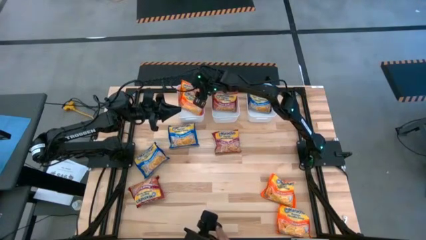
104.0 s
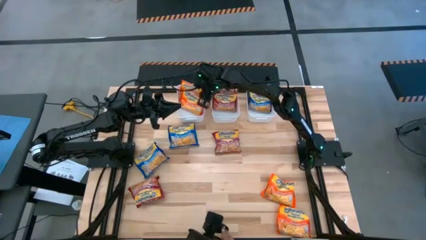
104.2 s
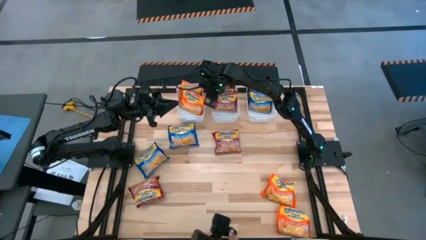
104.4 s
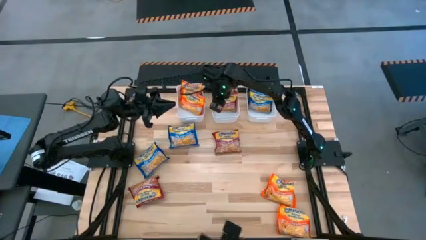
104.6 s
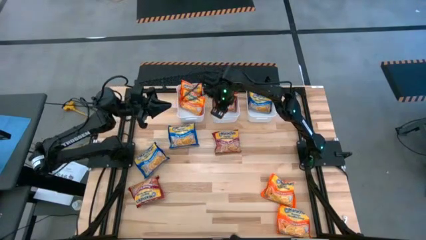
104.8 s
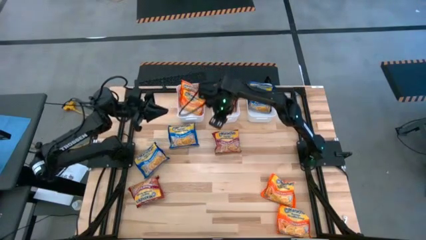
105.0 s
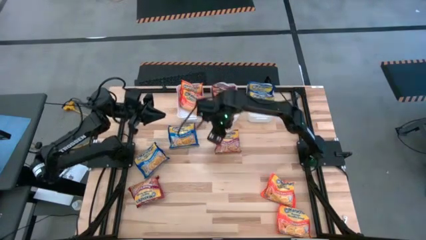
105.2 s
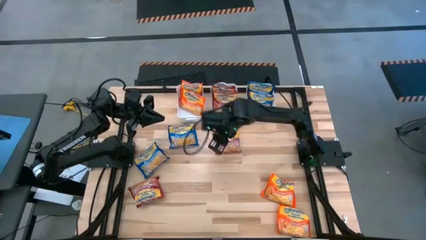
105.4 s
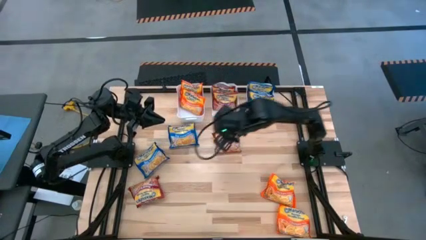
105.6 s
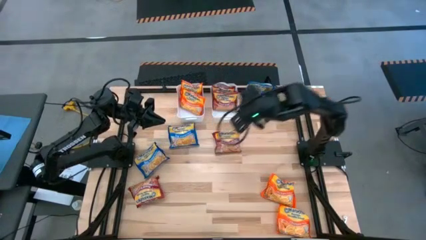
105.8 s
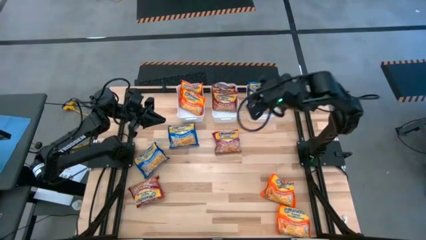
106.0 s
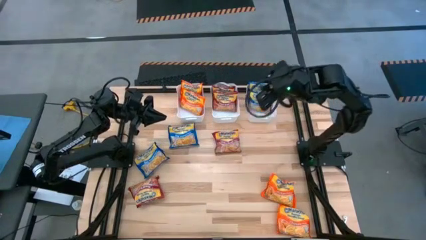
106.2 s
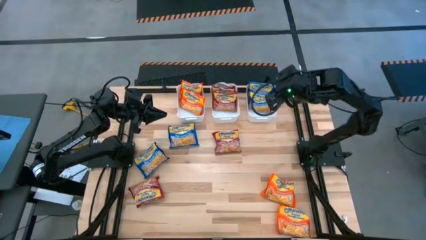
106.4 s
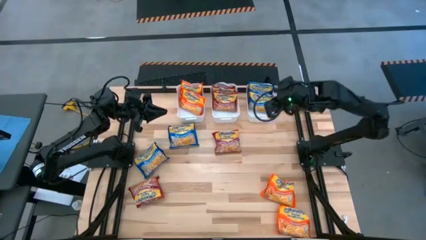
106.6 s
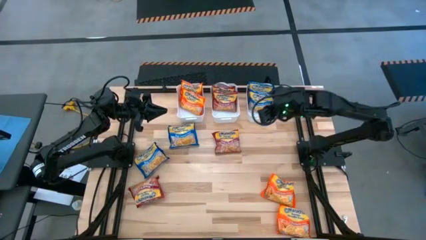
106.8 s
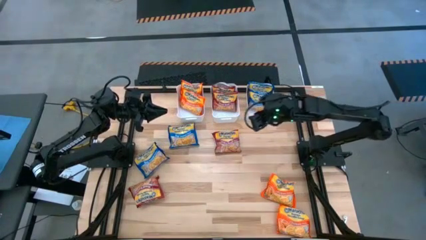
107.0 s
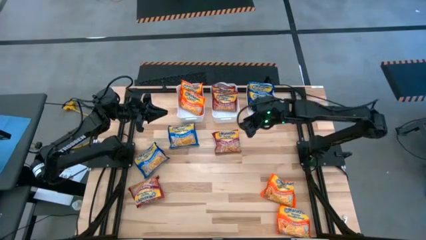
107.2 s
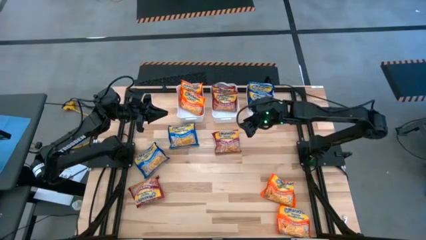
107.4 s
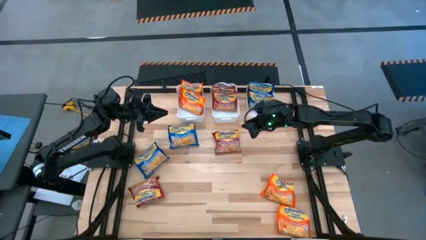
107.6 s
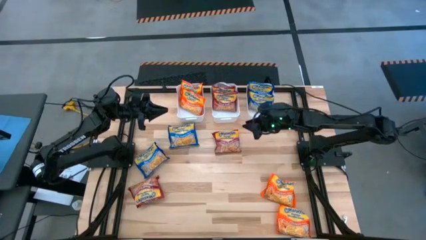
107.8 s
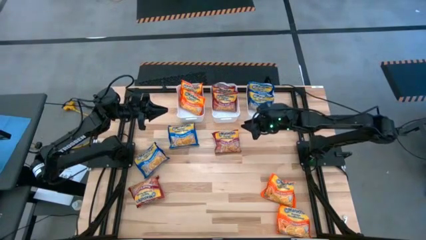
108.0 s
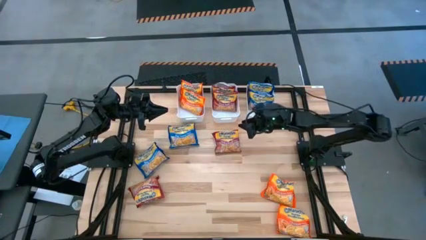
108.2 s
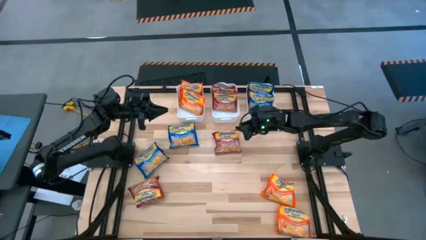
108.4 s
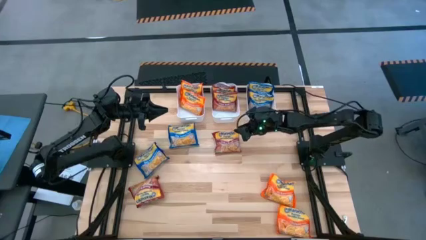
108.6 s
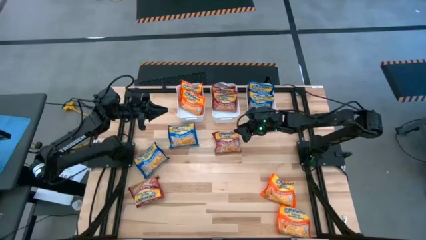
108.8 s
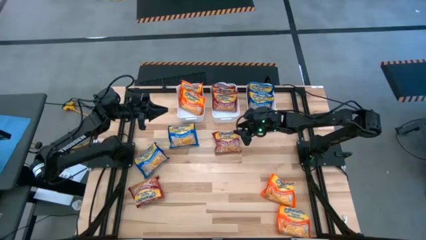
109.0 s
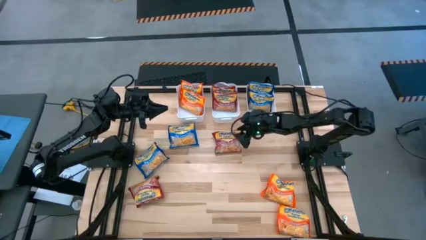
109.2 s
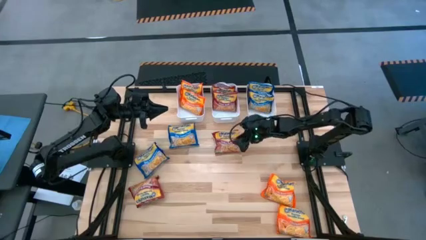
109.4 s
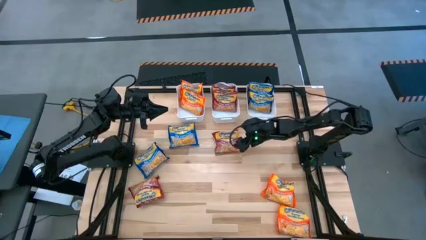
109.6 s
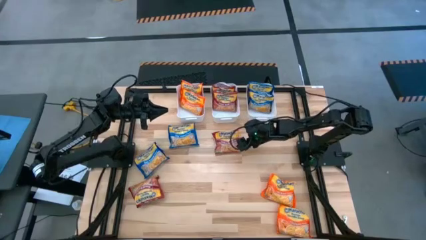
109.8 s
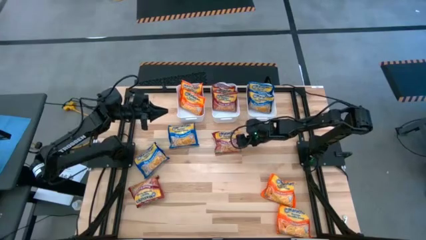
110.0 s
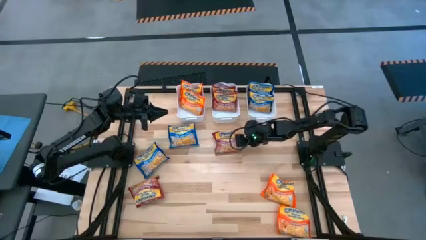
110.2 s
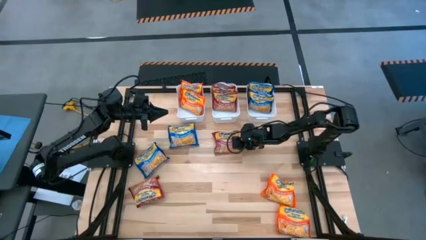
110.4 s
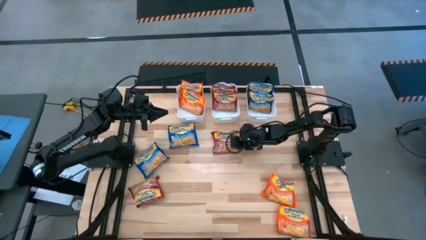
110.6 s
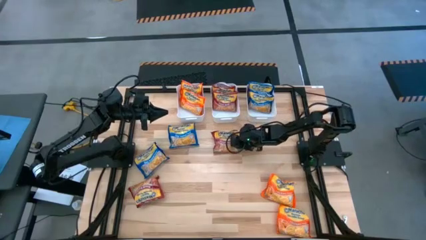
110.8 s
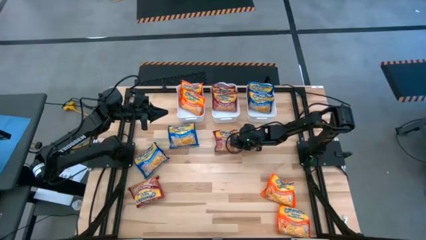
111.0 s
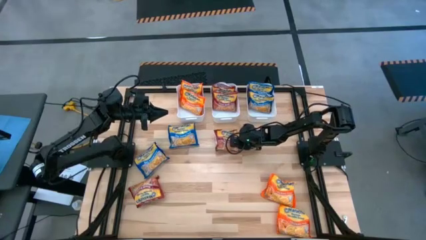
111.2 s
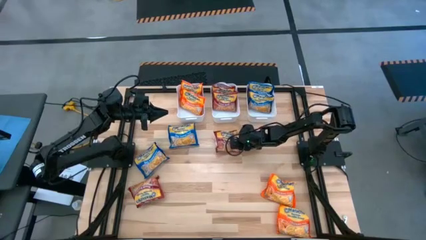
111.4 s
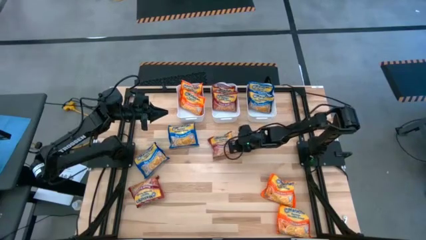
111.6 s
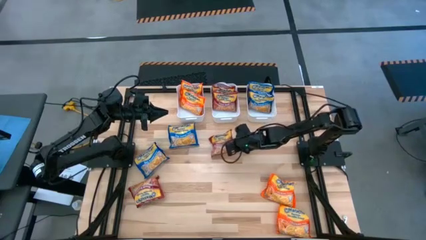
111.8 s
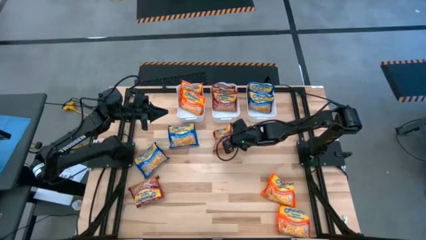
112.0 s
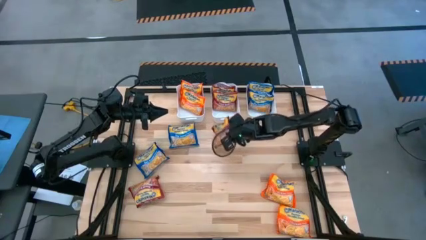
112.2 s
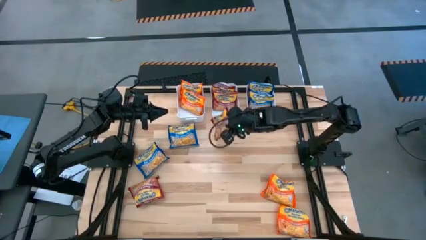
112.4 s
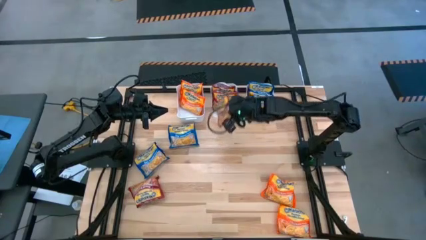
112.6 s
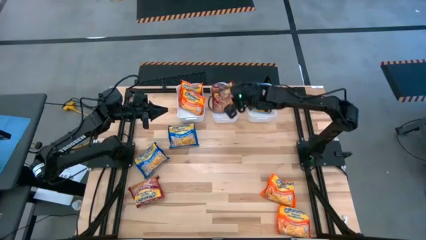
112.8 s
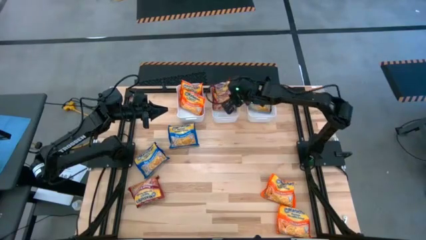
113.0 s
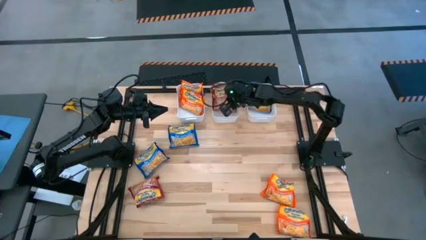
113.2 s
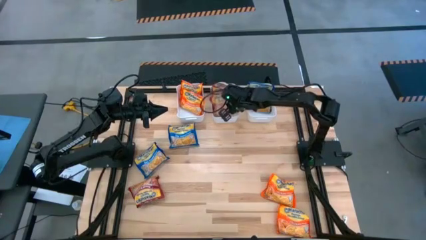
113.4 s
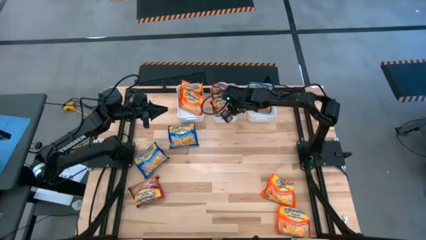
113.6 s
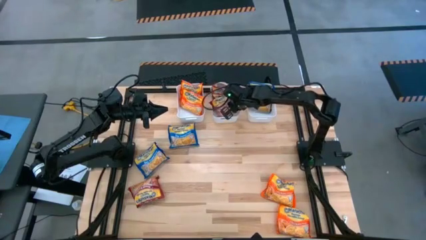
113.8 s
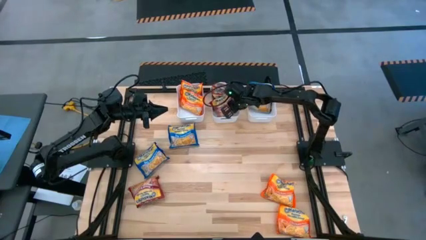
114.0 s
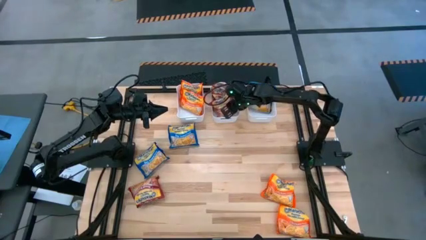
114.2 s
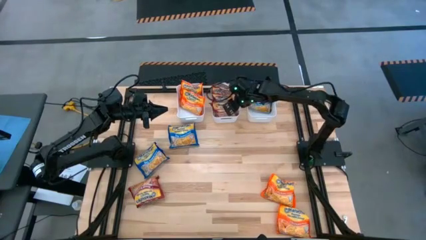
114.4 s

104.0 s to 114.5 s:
Task: Sort Maruchan noodles
Put the red noodle pack into the middle white bin

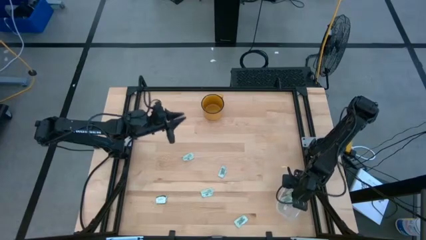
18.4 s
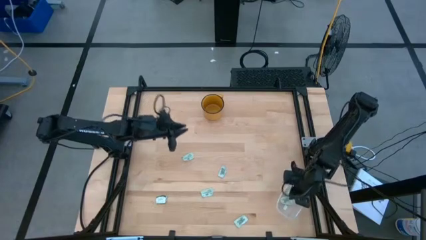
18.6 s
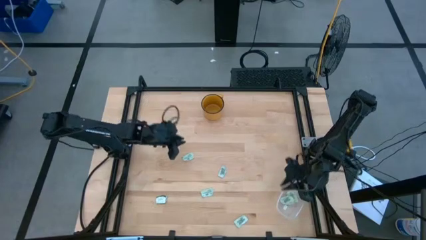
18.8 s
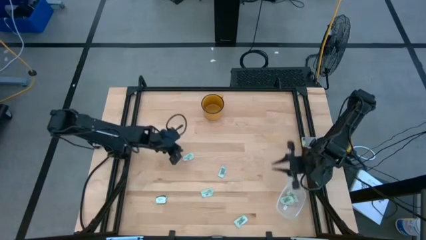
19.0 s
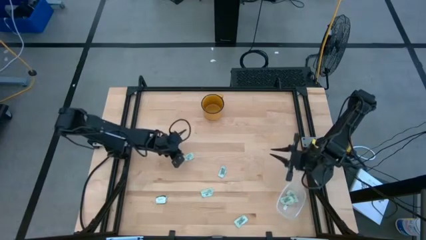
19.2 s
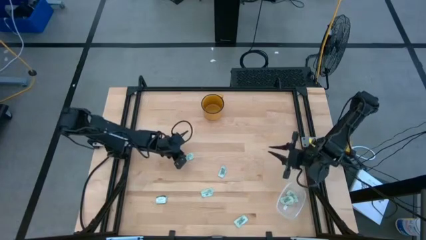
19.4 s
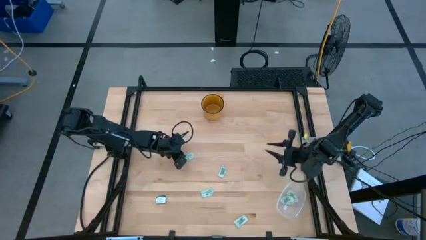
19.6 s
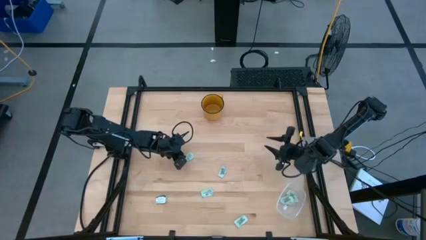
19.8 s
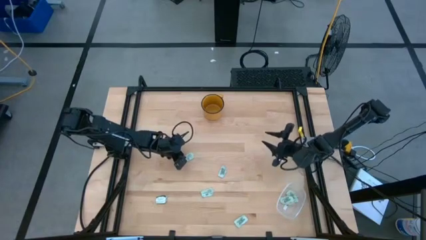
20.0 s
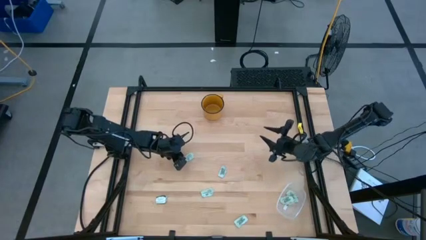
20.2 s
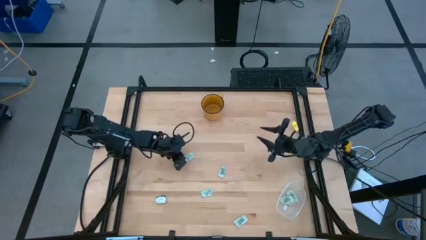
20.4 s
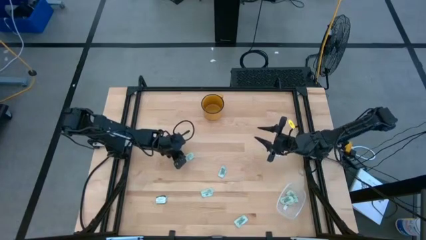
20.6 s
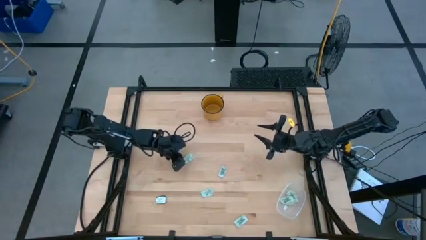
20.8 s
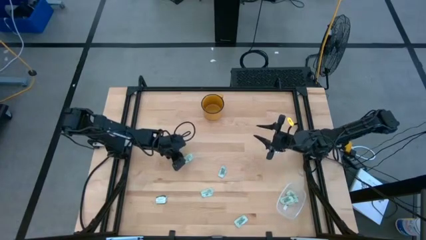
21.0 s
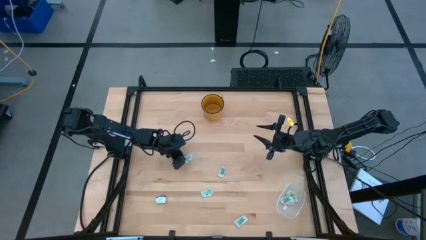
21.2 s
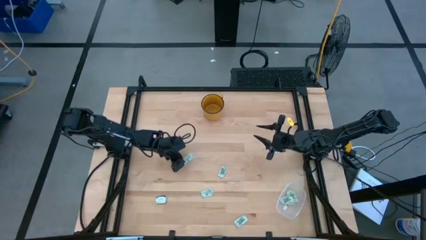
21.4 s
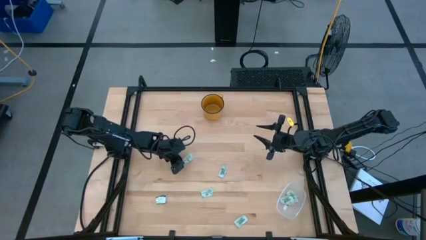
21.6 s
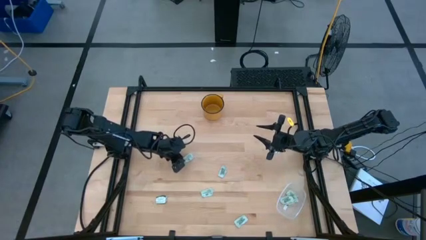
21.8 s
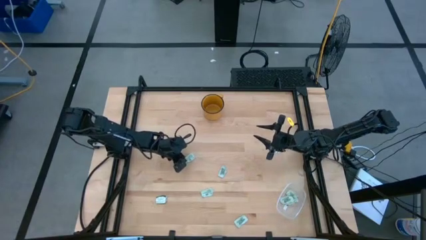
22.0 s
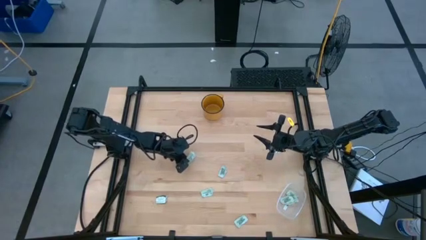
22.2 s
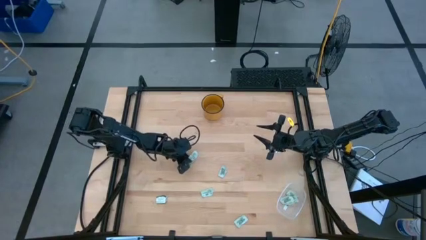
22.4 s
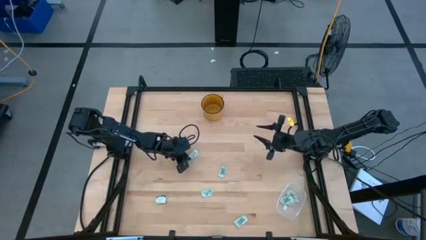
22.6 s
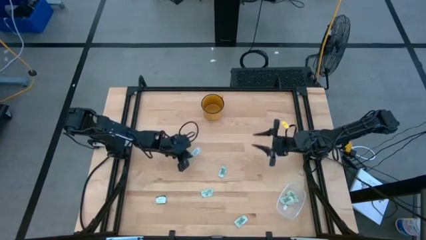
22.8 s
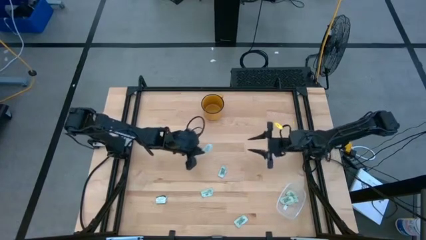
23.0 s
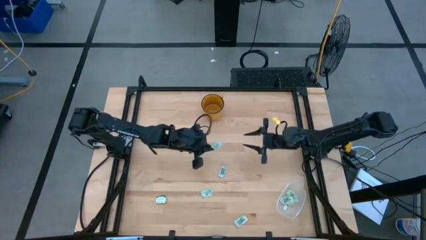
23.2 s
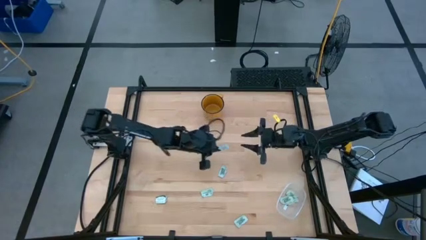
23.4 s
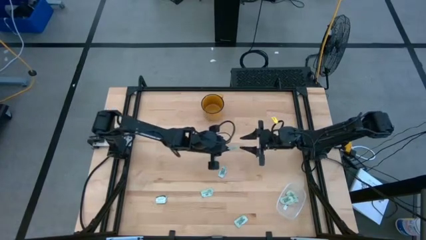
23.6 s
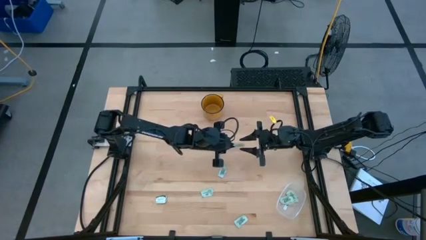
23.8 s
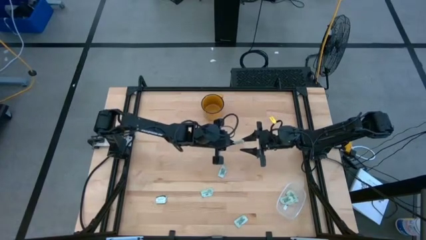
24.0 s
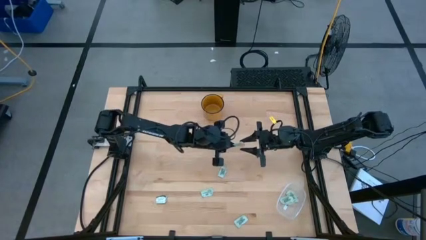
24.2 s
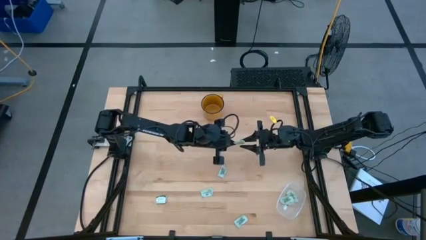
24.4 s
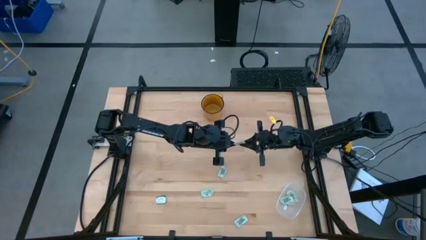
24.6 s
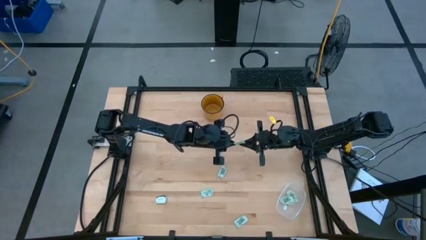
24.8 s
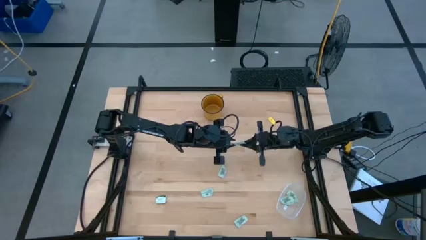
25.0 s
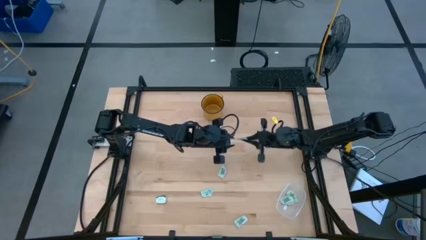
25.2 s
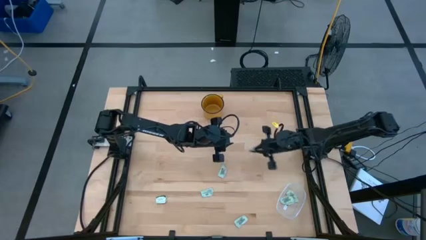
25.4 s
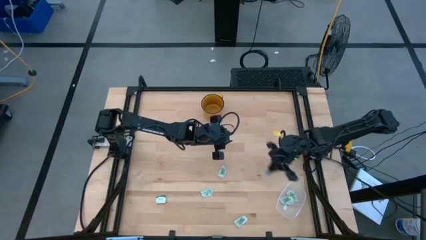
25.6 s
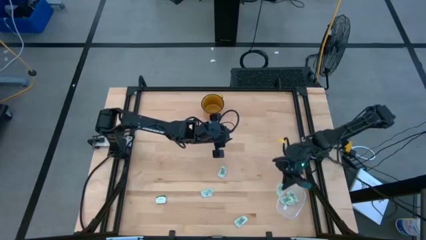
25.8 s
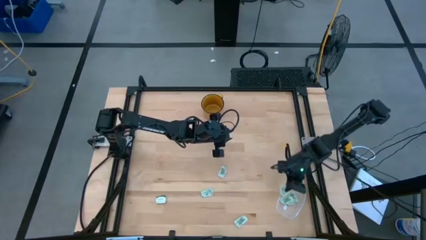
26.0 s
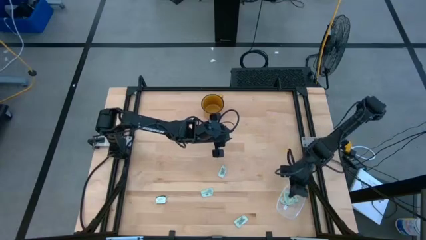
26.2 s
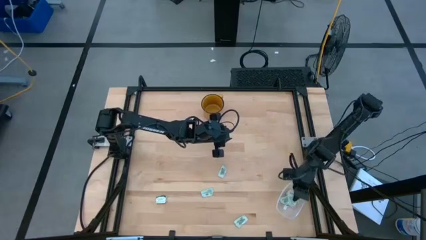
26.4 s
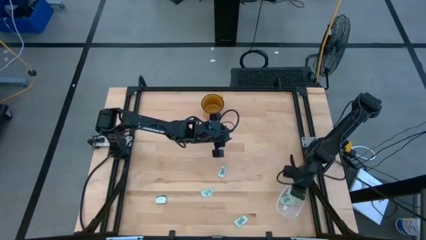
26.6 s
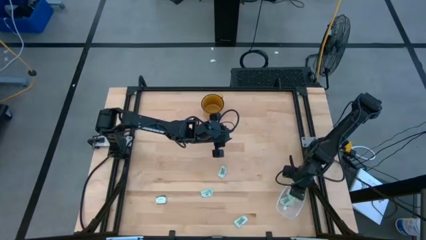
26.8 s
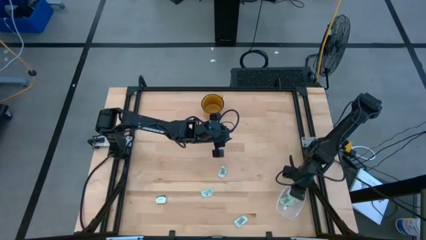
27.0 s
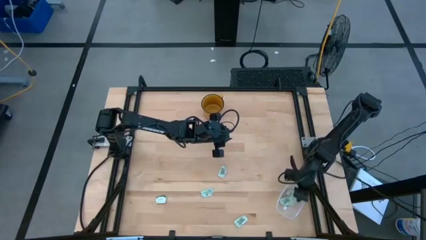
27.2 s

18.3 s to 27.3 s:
Task: Pick and place Stevia / Truvia into bins
Put the stevia packet into the transparent bin
